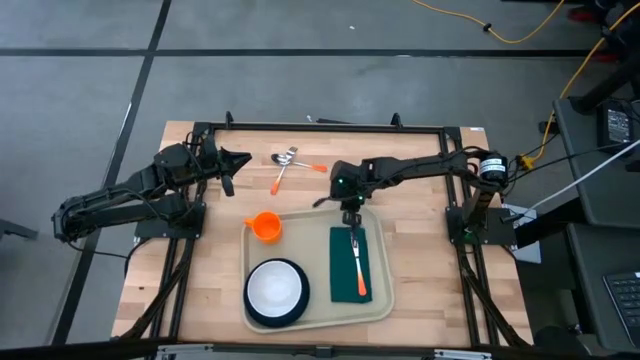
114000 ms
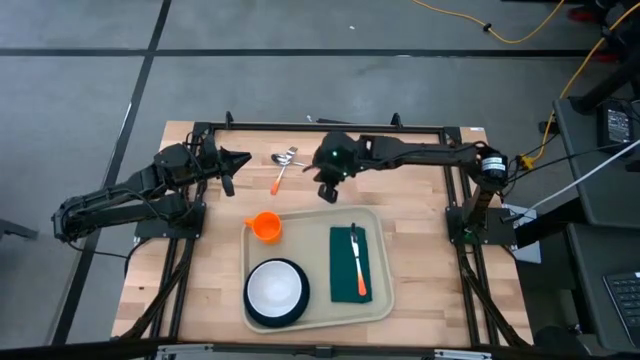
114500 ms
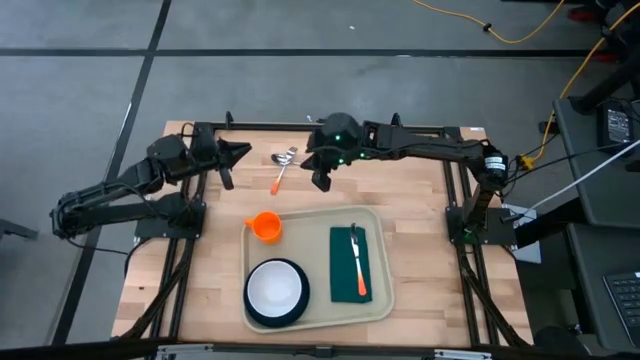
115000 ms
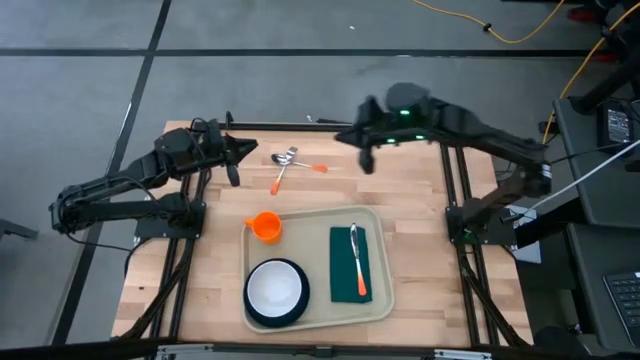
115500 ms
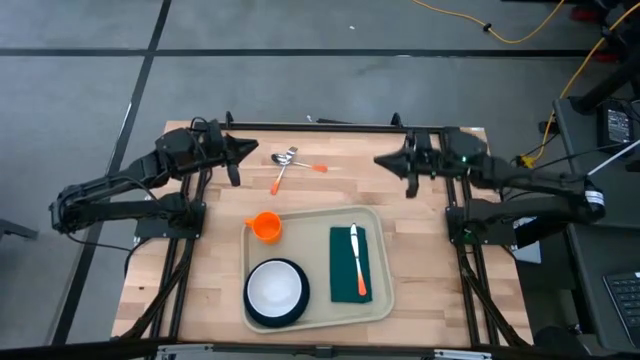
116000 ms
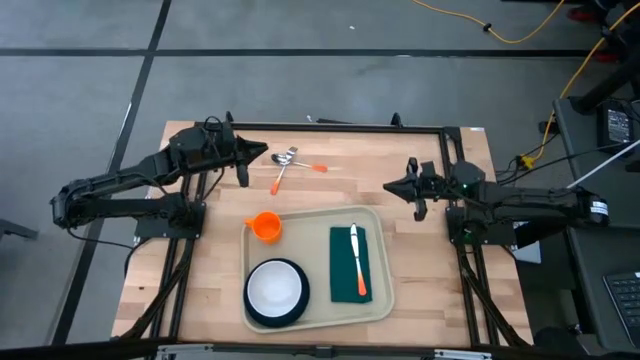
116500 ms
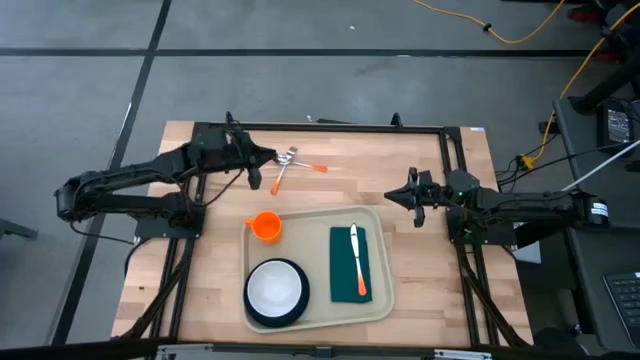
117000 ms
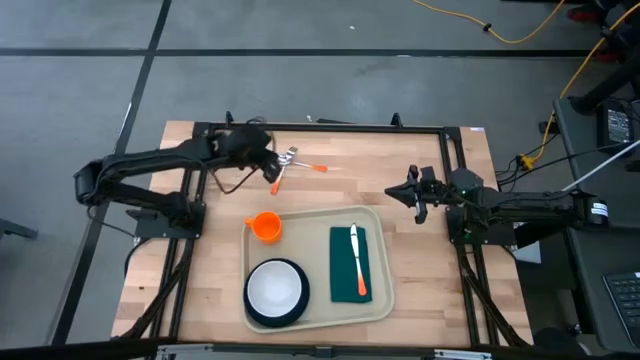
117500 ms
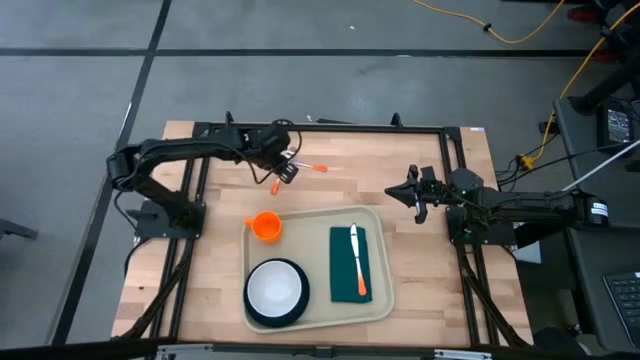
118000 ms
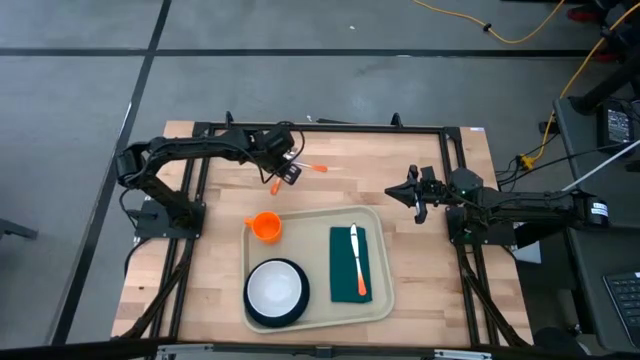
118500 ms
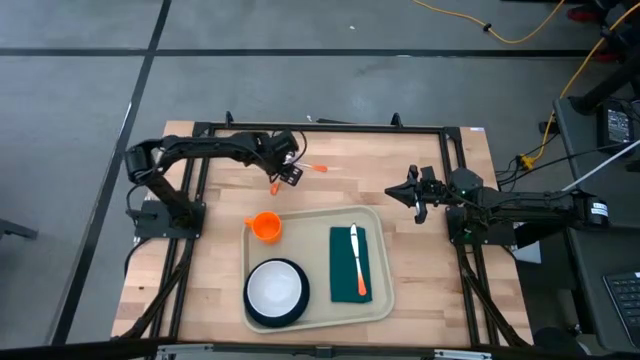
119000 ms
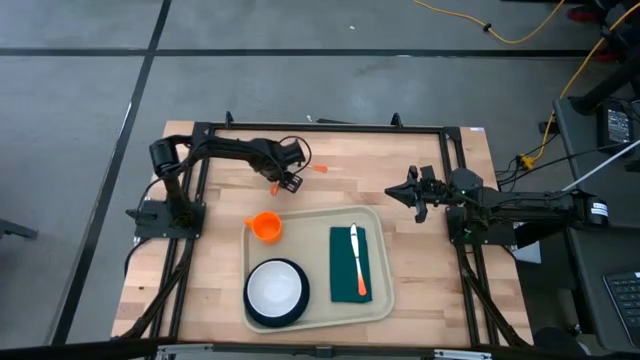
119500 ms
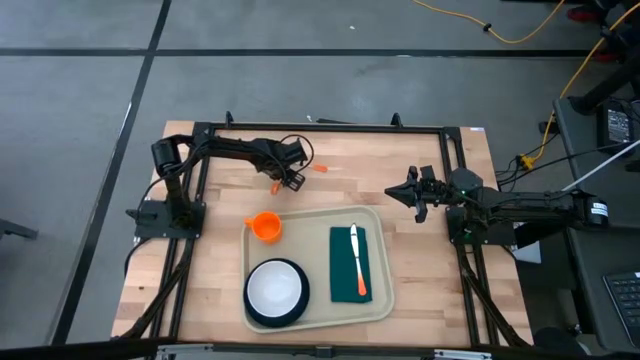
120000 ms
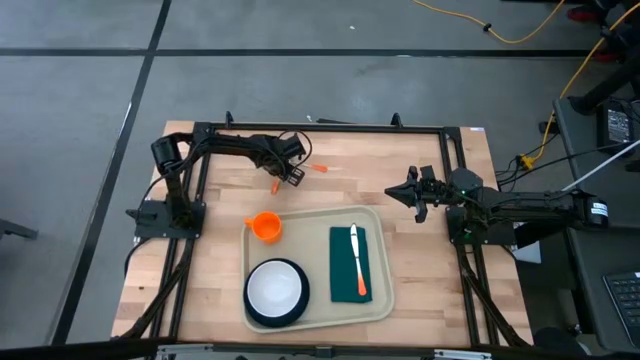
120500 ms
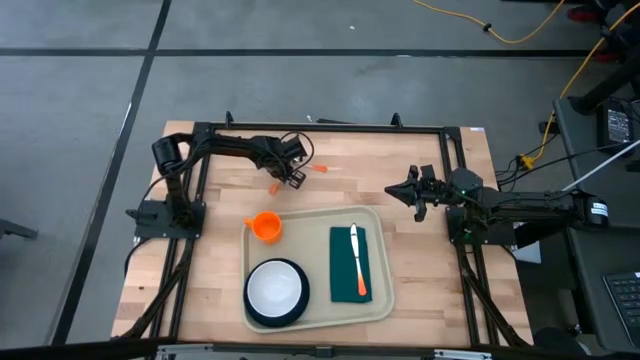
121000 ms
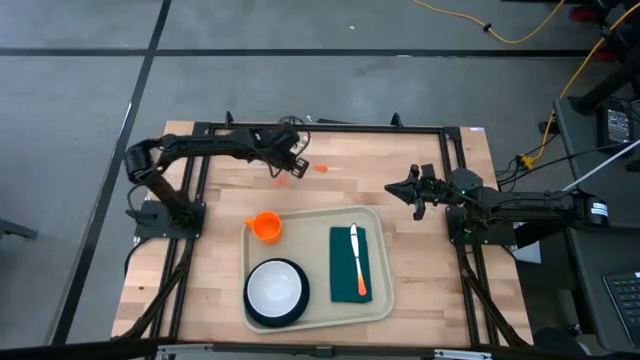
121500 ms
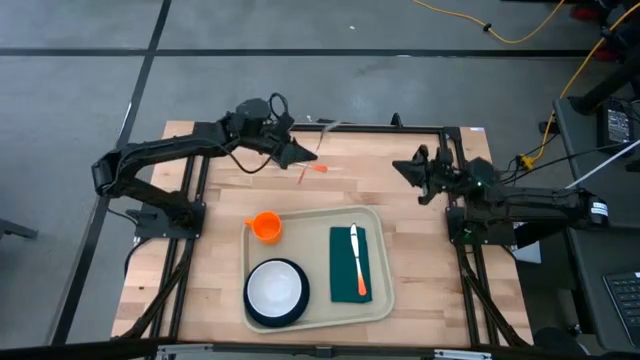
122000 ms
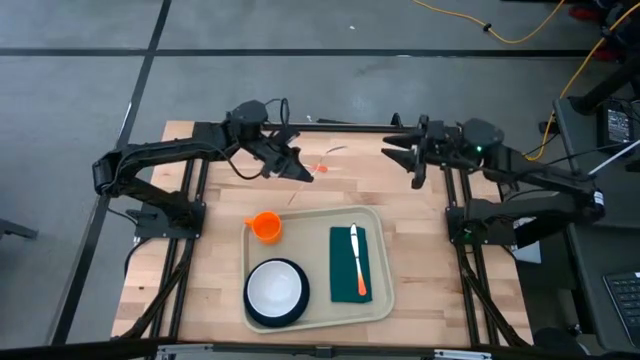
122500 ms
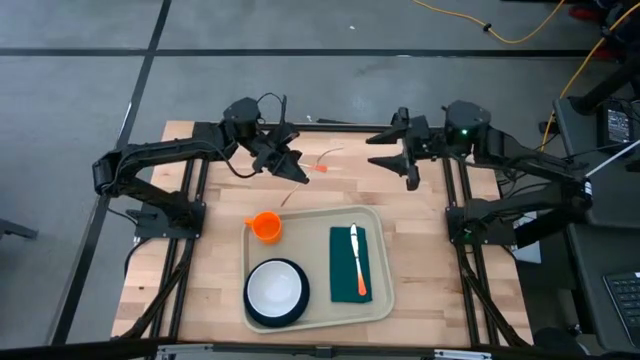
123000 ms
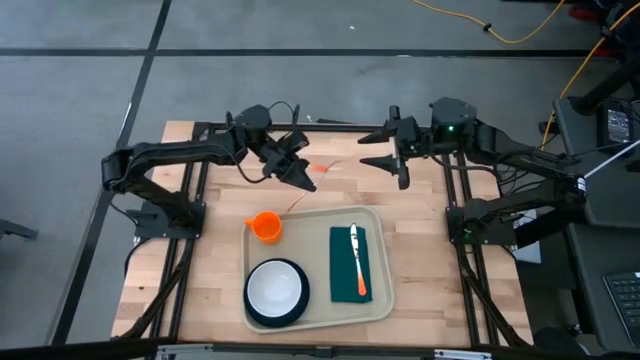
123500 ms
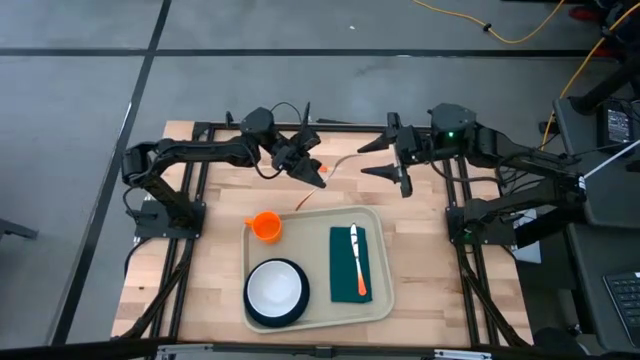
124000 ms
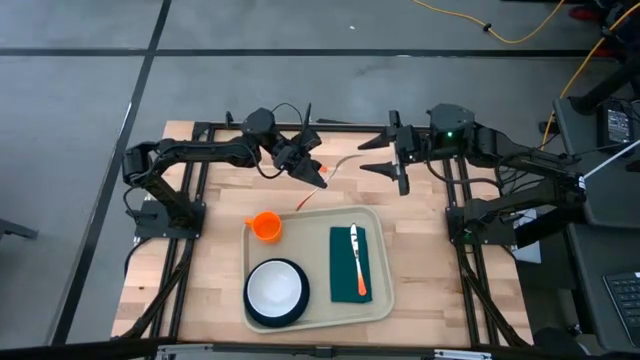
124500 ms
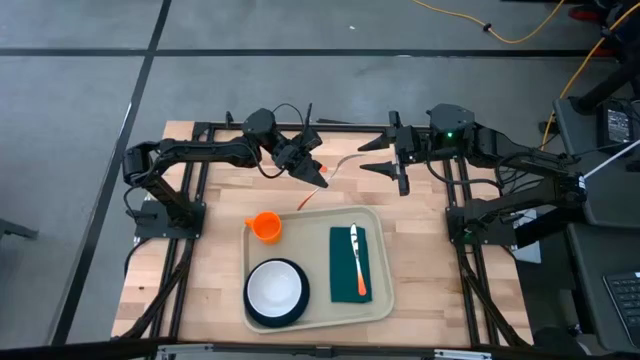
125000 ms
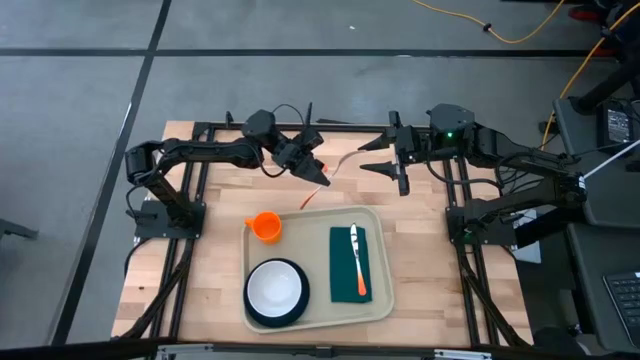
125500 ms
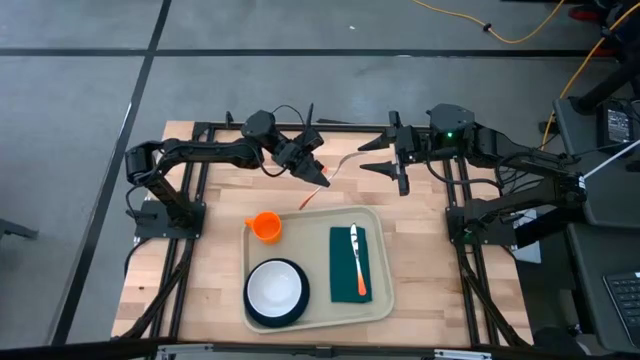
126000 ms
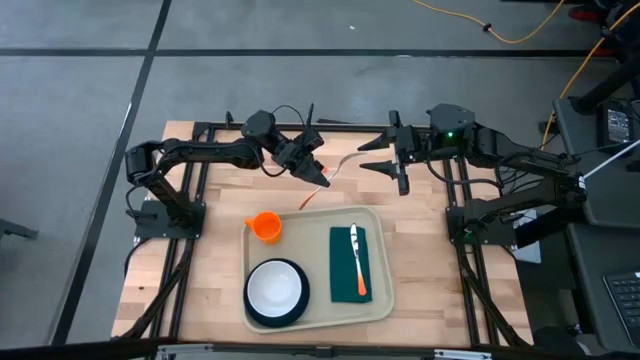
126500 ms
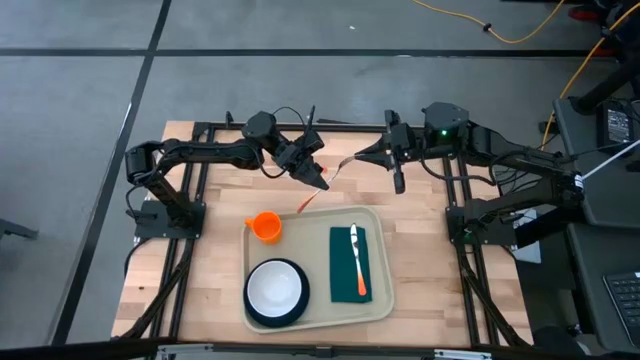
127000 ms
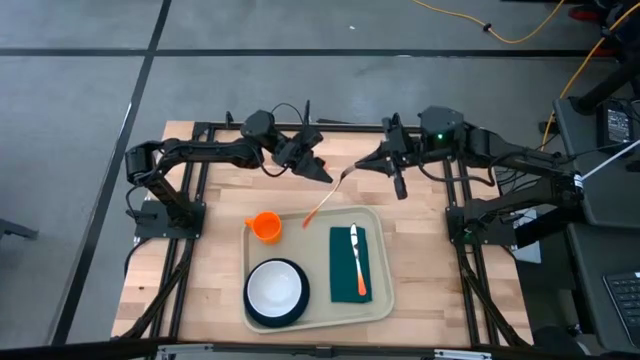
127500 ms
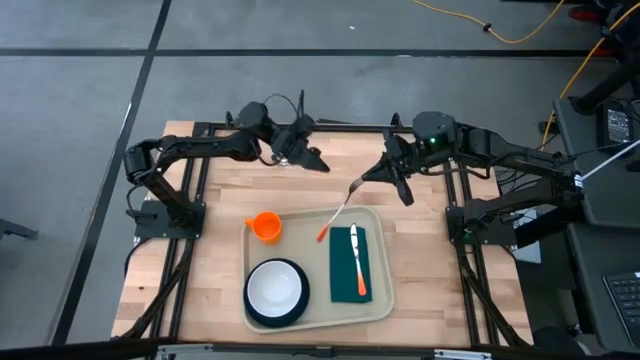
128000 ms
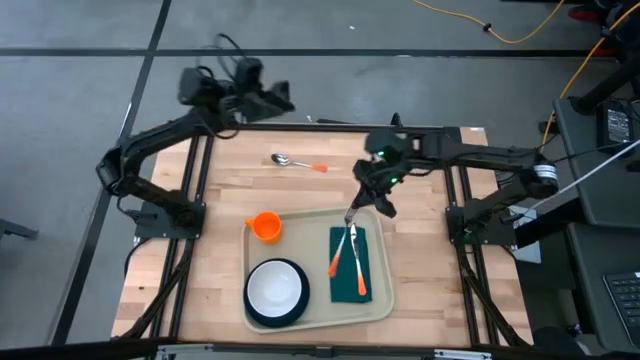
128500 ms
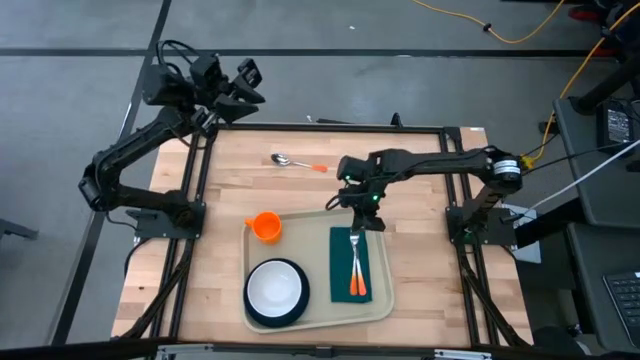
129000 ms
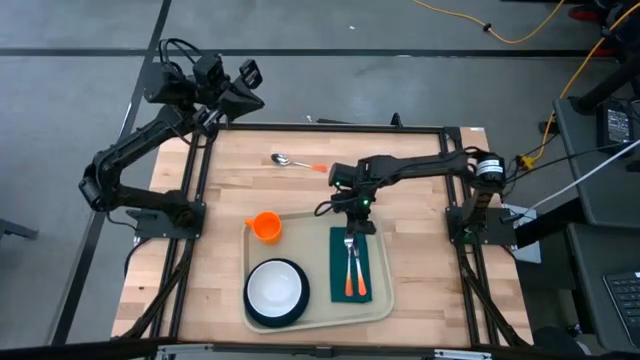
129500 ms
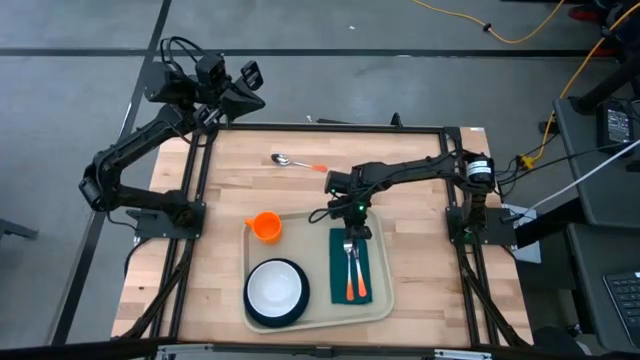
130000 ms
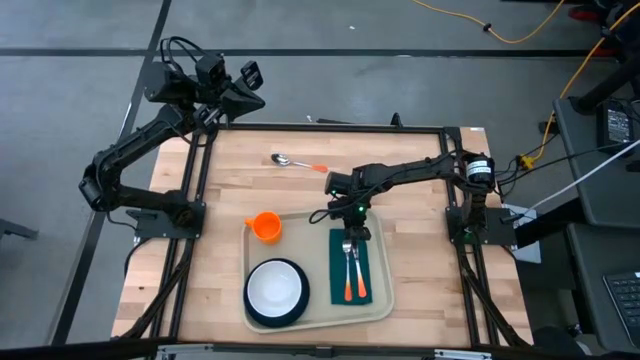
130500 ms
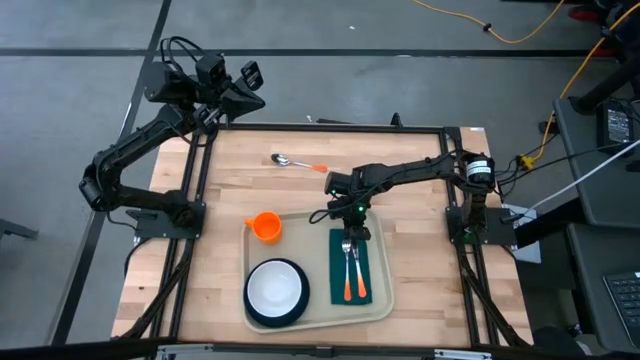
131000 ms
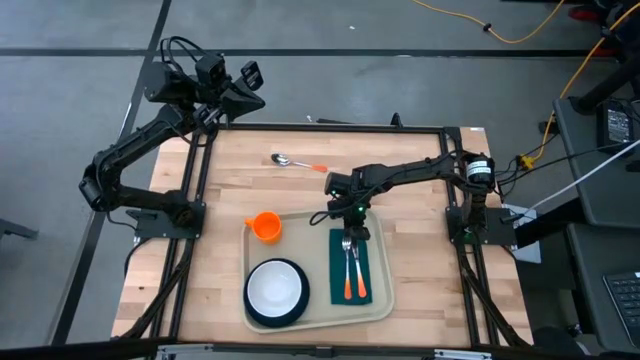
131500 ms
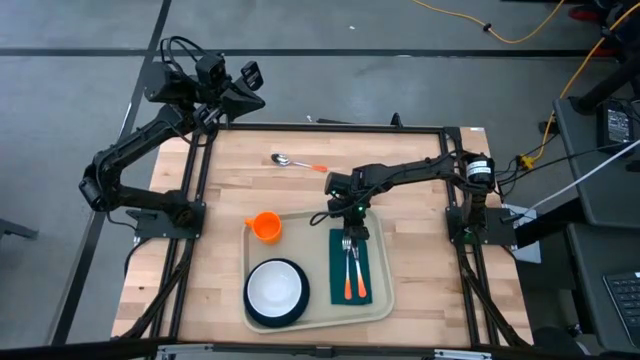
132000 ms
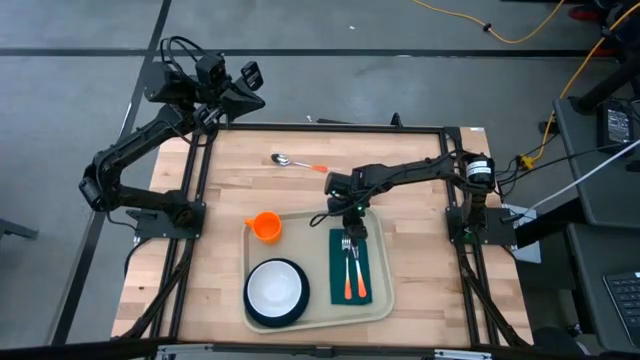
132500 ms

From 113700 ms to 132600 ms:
Task: Set up tray
Put the orange fork to the left of the orange knife on the dark blue napkin on the gray serving tray

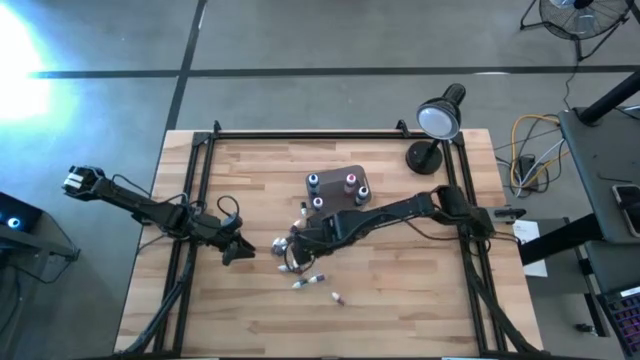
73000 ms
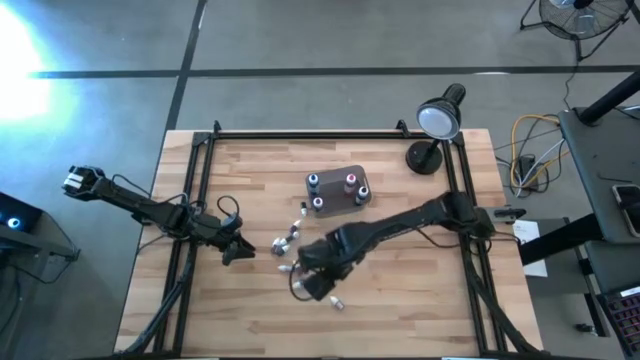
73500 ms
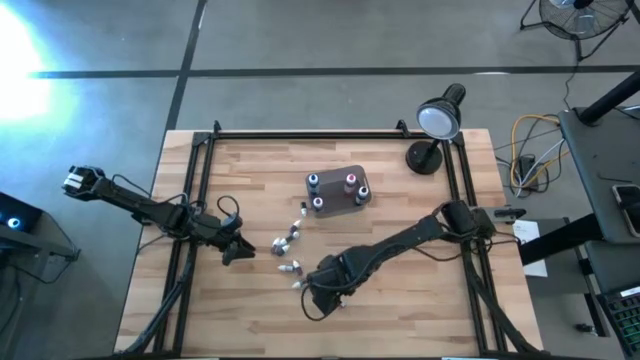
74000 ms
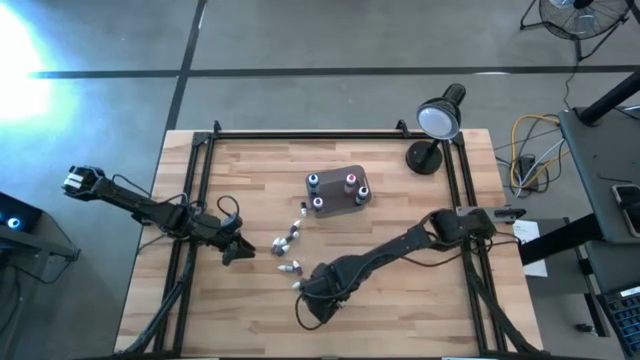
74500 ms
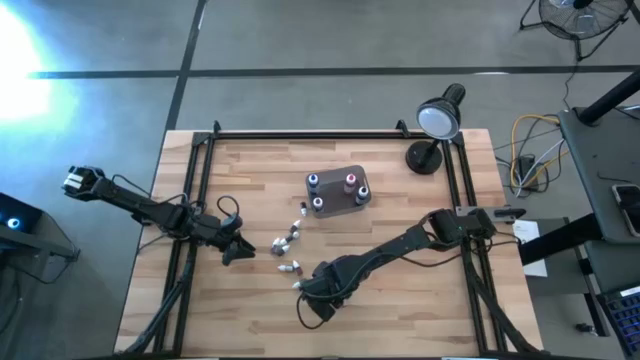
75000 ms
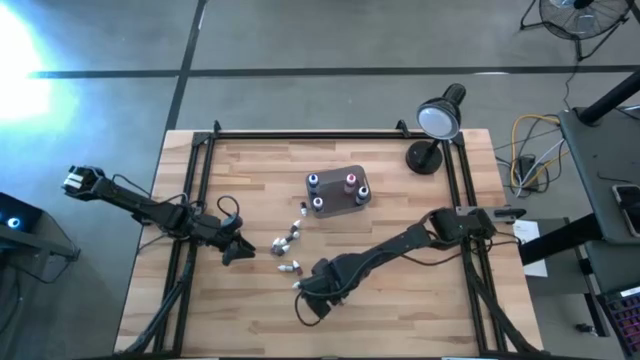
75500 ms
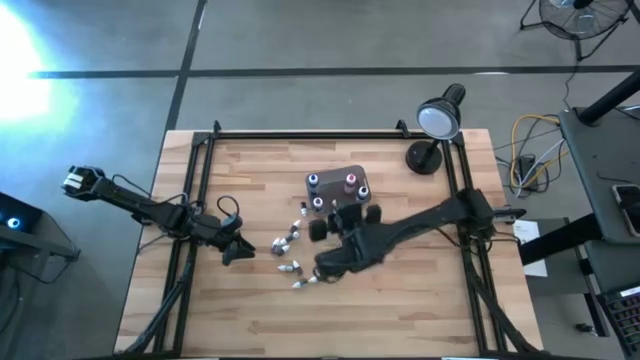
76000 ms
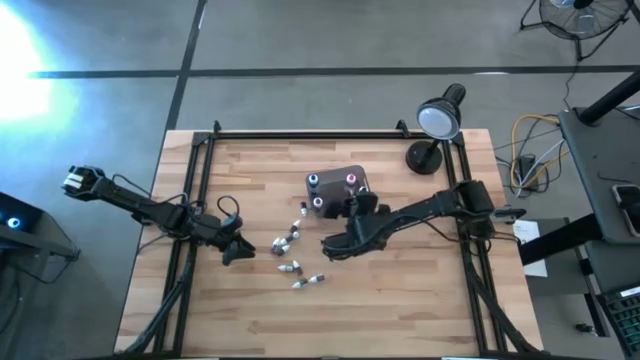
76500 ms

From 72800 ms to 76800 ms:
Task: Pick & Place food coloring
Put the small dark green food coloring bottle into the black transparent bin
